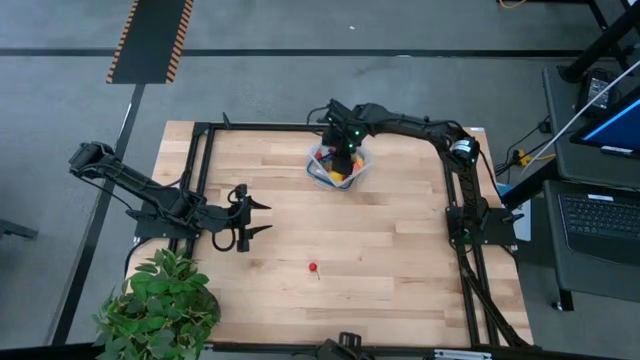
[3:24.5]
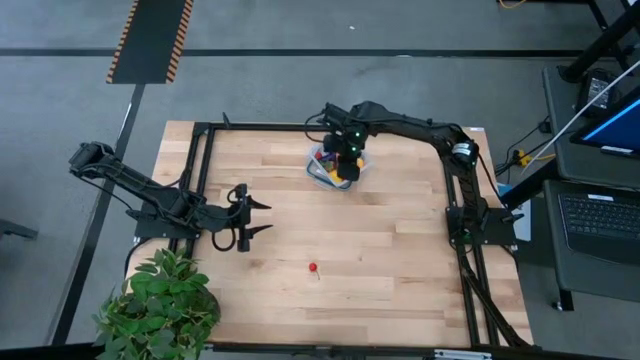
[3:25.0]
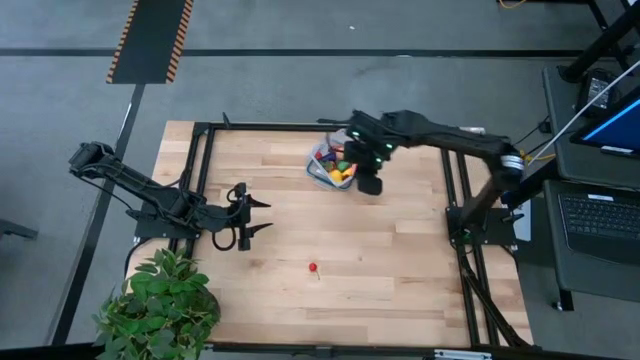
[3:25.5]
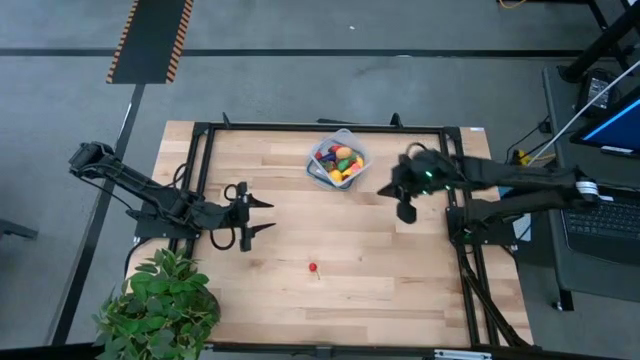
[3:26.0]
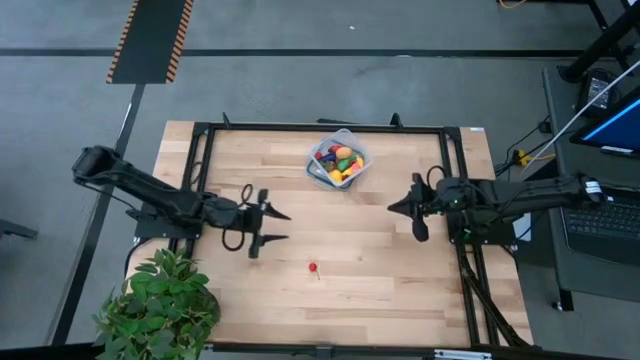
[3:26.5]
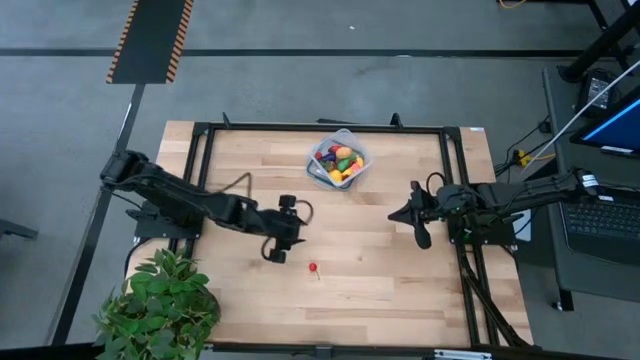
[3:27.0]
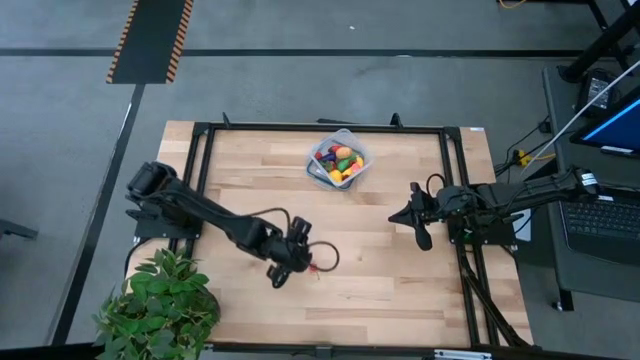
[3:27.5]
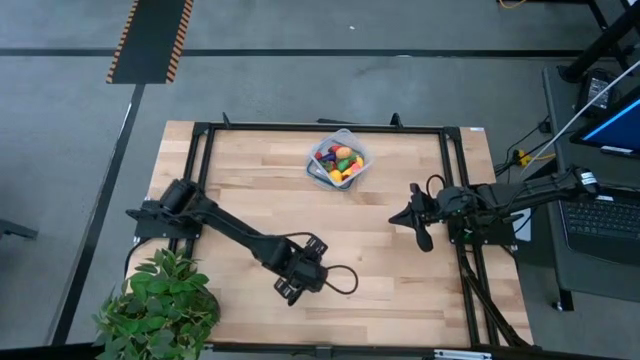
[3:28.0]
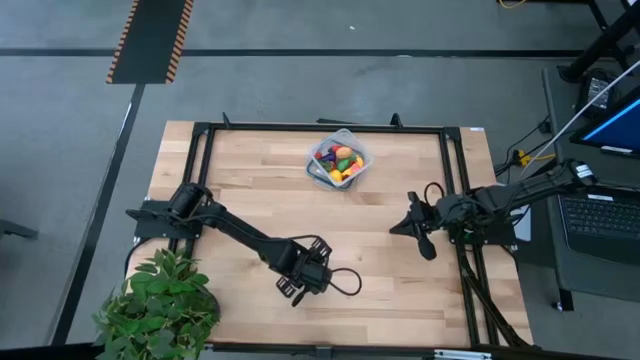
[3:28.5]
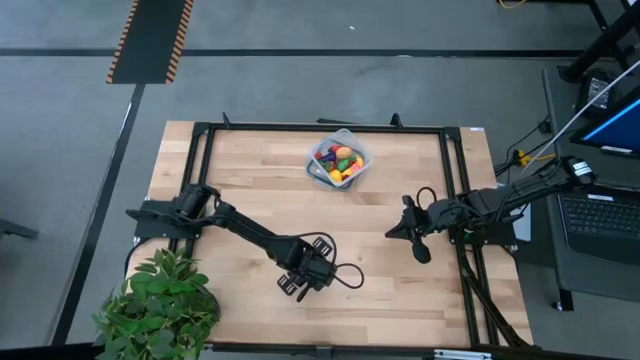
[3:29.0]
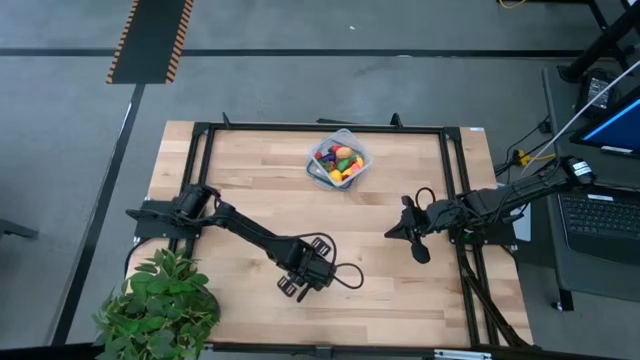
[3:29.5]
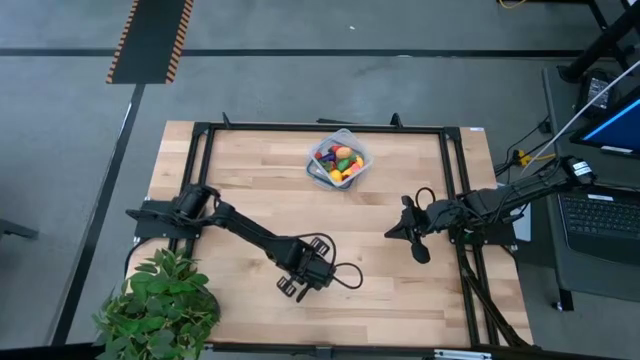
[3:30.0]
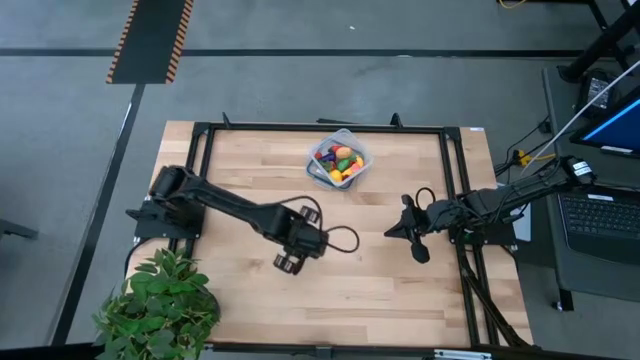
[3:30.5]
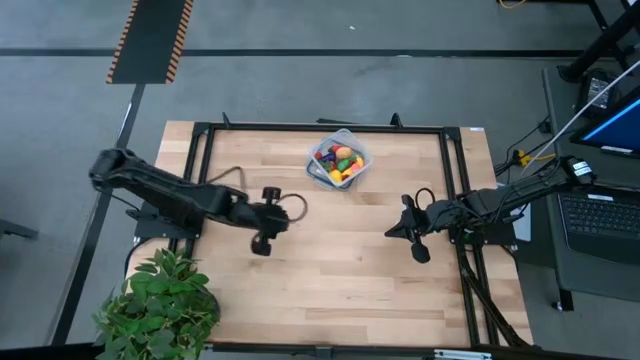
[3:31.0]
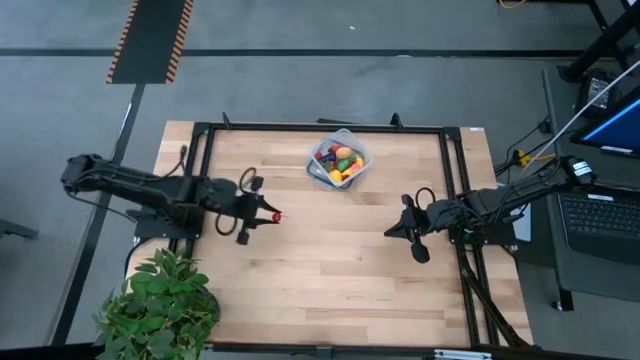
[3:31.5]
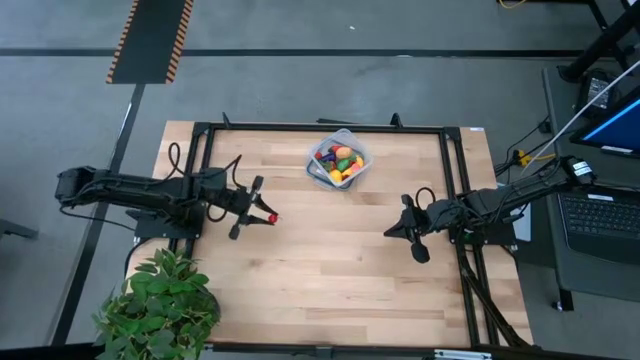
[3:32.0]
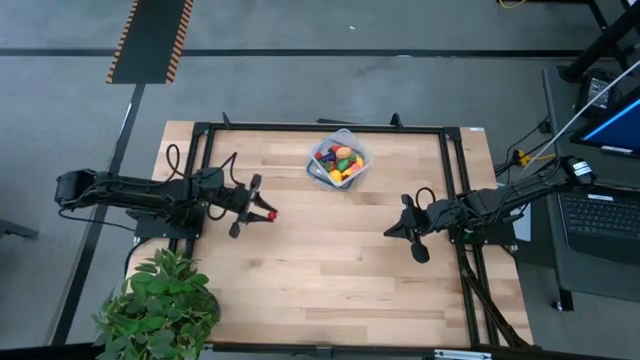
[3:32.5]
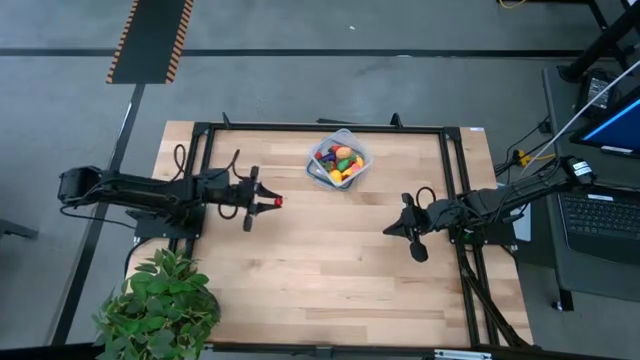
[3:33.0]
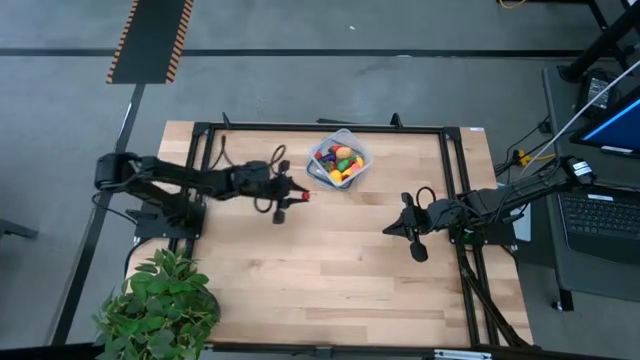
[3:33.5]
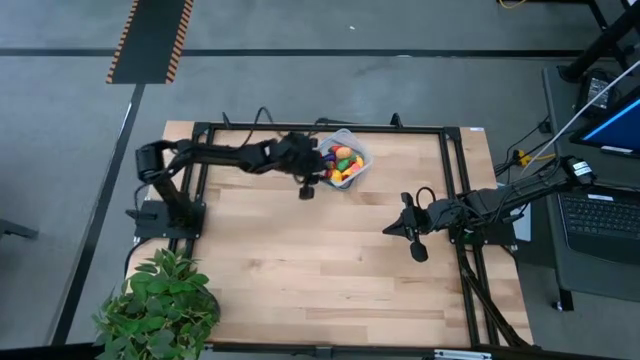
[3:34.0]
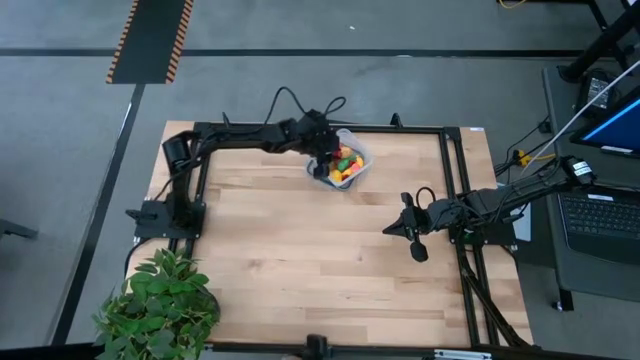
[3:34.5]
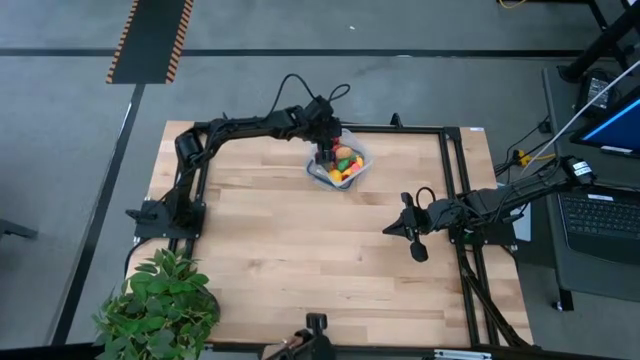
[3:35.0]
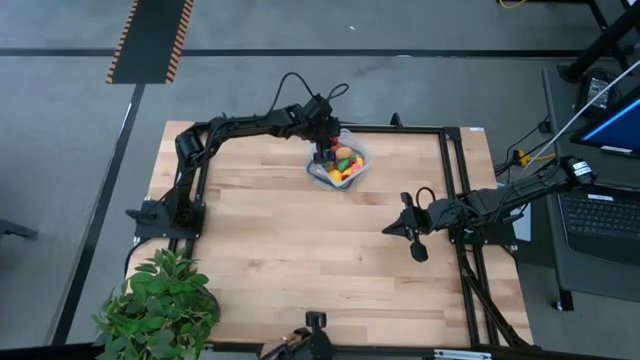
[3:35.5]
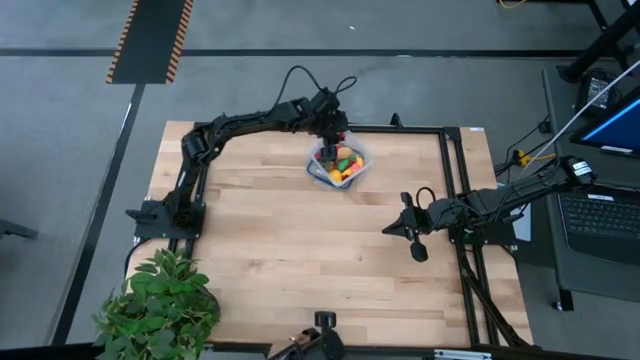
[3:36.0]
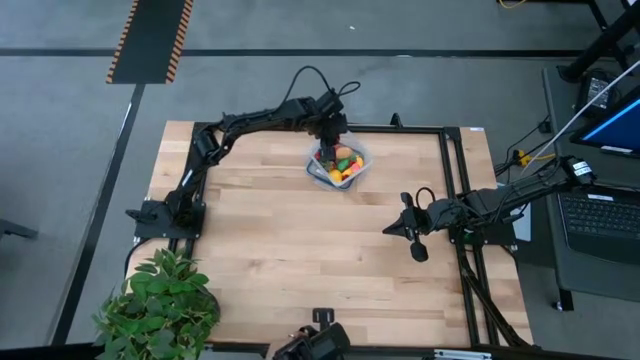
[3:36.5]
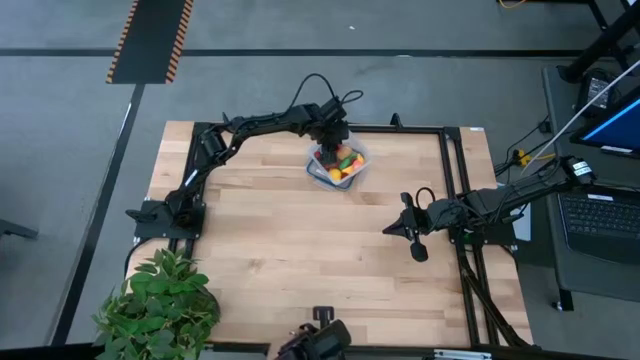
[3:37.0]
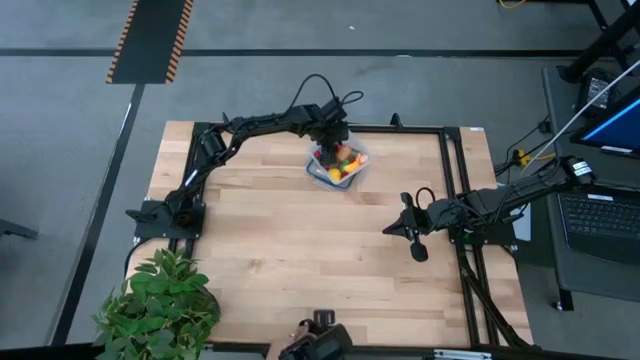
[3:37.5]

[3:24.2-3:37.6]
Task: Pick and placing Produce into tupperware
Put the red cherry into the transparent container

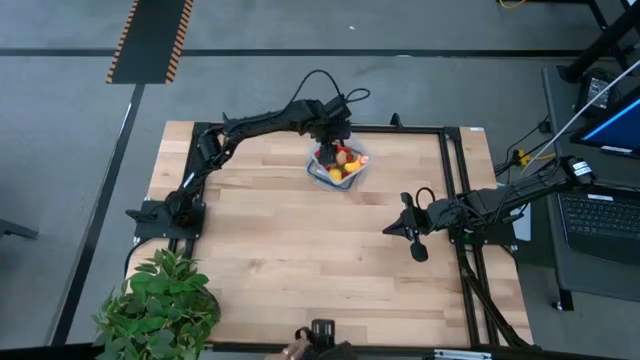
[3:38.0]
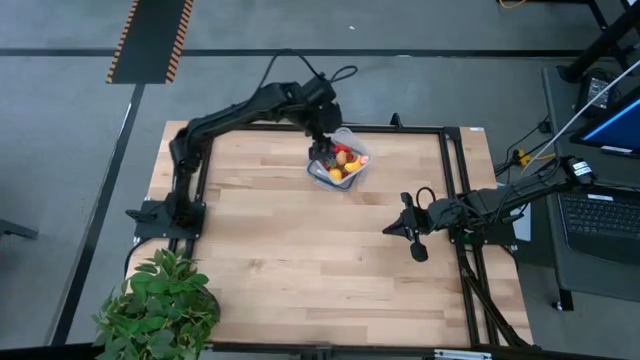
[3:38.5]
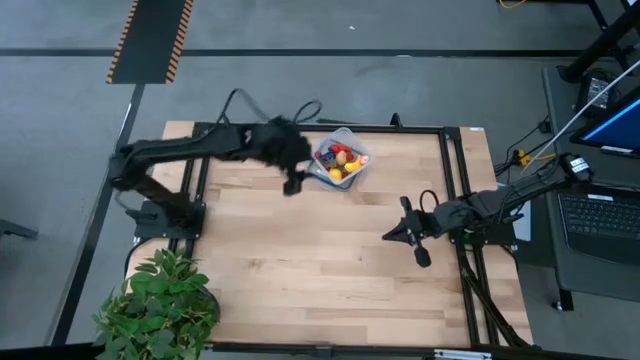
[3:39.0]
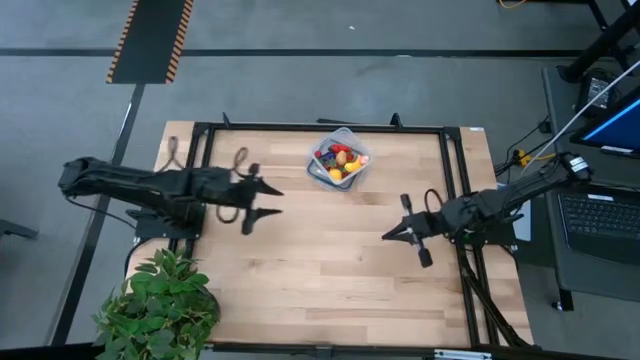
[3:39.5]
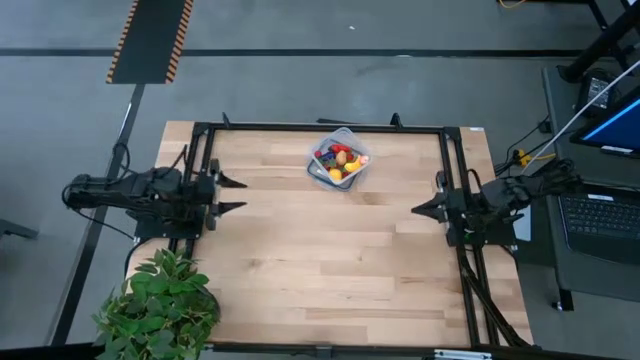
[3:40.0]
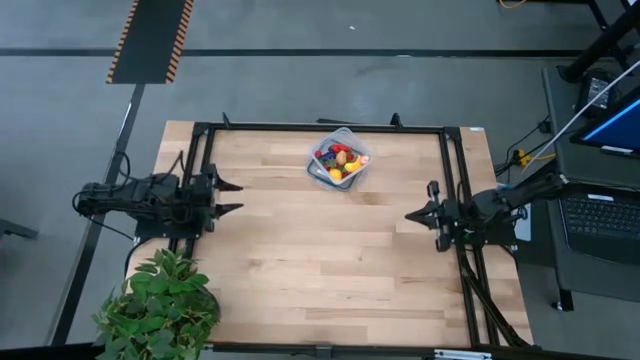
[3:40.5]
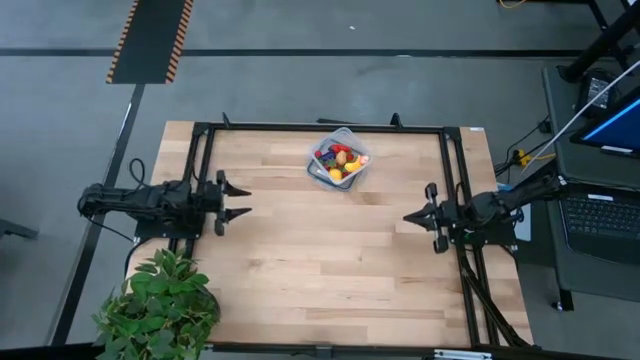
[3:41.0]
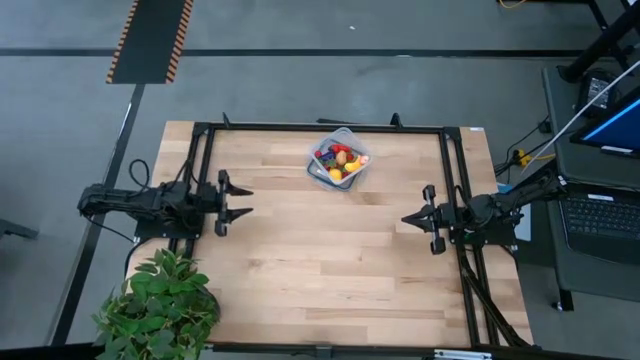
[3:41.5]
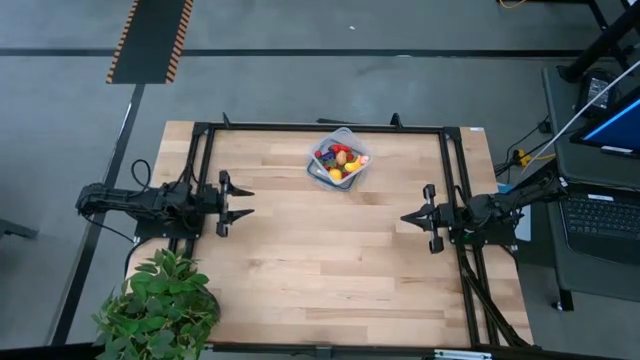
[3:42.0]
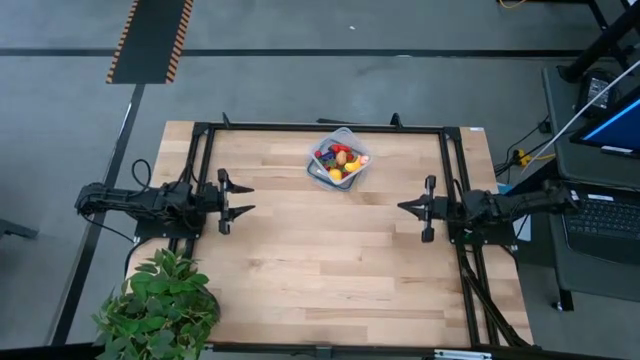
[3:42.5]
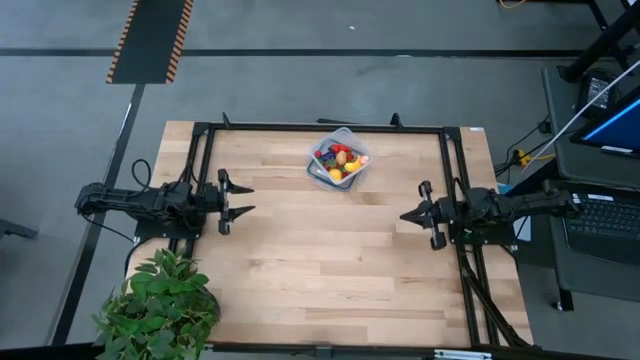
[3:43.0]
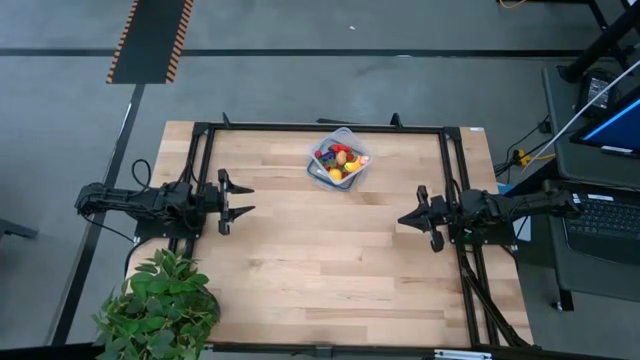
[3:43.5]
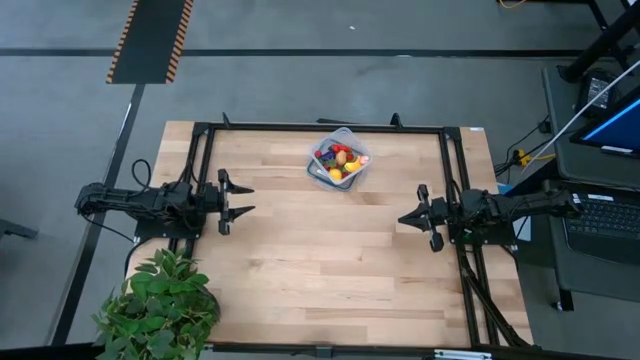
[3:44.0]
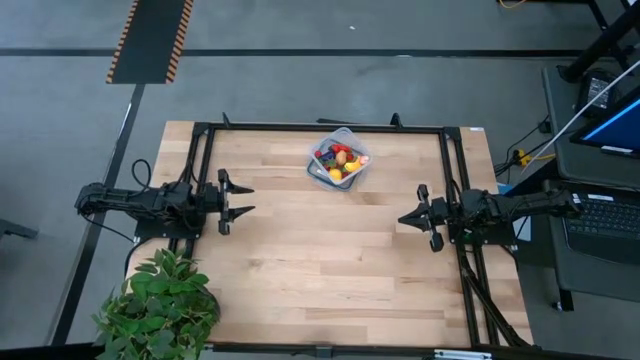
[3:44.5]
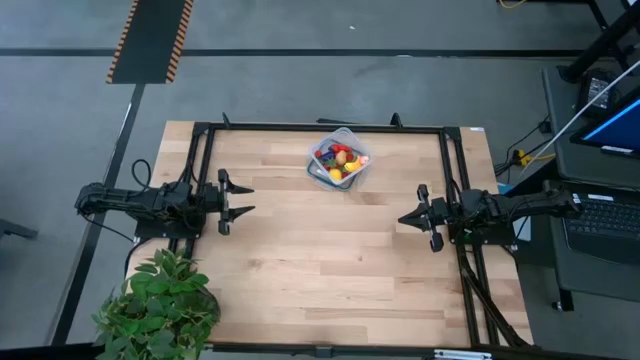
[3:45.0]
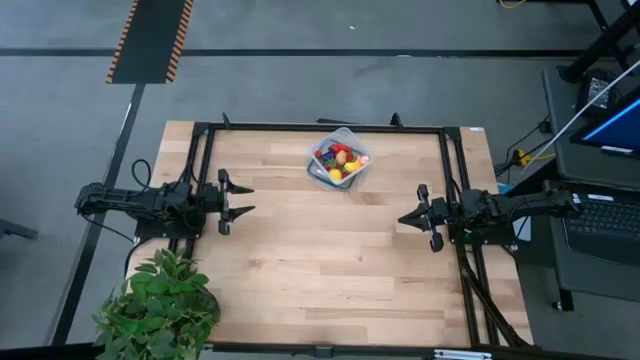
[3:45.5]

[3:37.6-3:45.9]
Return to Home Position
